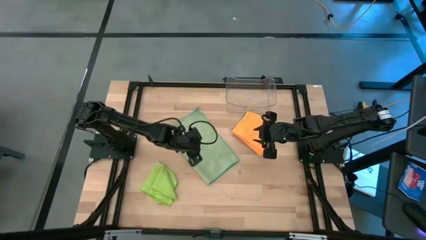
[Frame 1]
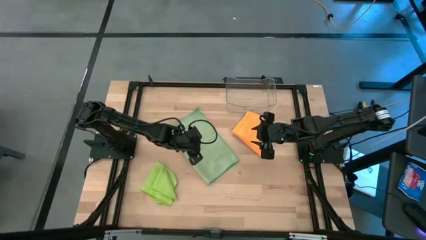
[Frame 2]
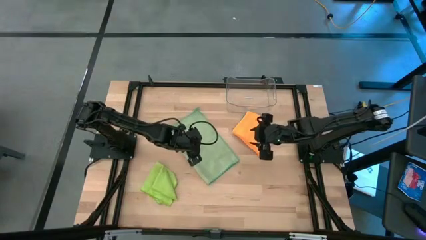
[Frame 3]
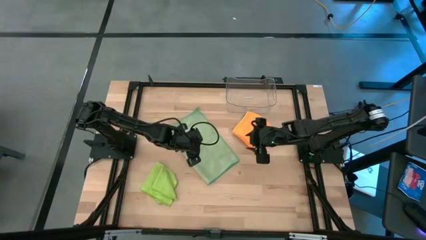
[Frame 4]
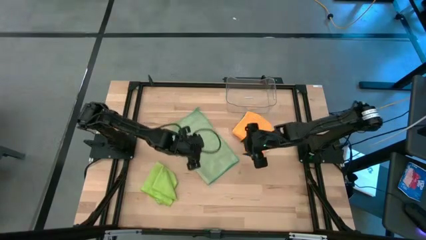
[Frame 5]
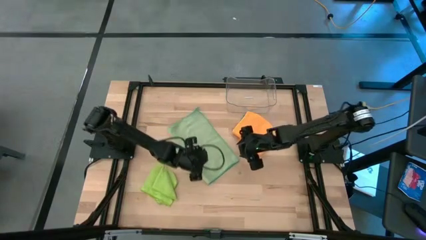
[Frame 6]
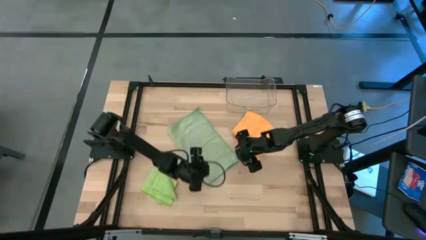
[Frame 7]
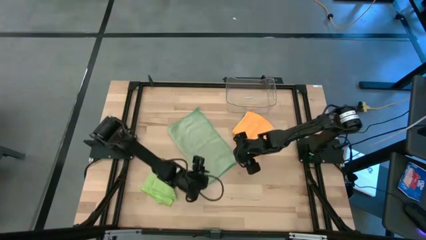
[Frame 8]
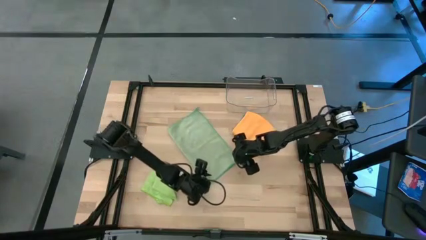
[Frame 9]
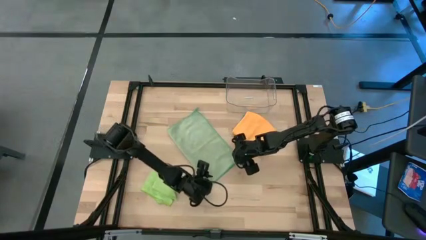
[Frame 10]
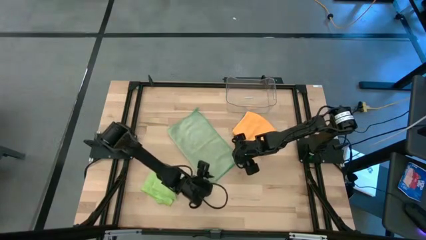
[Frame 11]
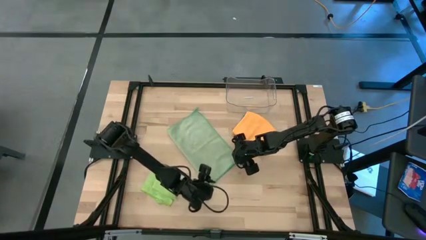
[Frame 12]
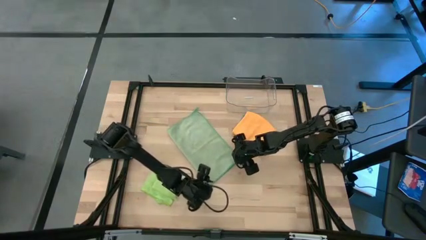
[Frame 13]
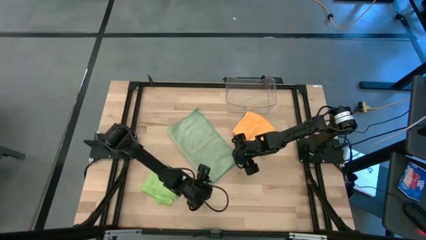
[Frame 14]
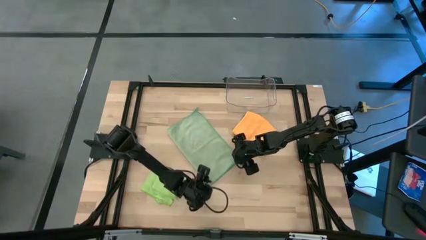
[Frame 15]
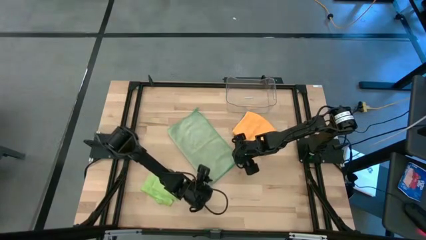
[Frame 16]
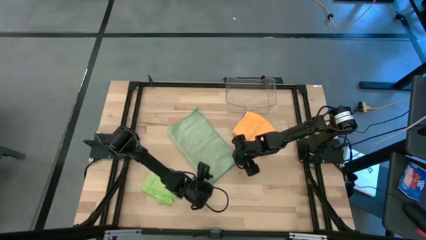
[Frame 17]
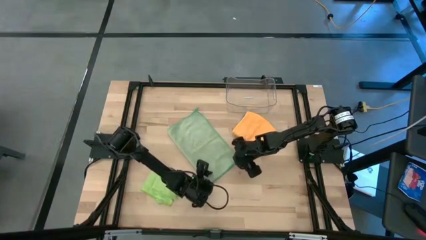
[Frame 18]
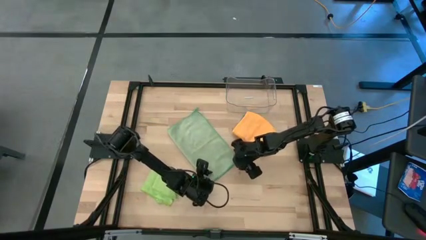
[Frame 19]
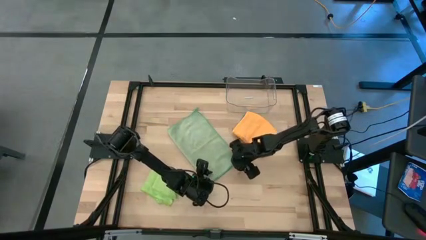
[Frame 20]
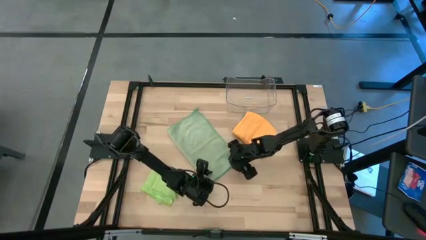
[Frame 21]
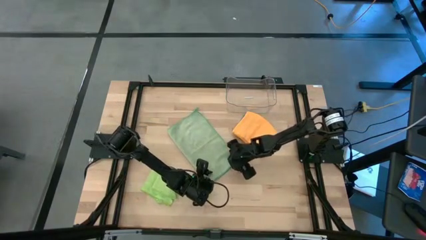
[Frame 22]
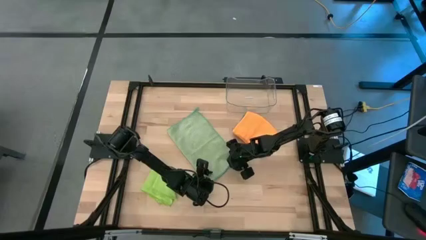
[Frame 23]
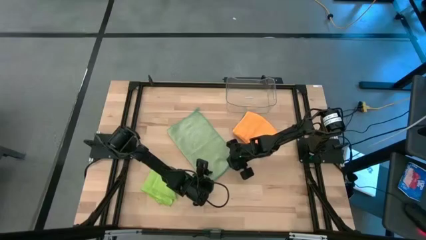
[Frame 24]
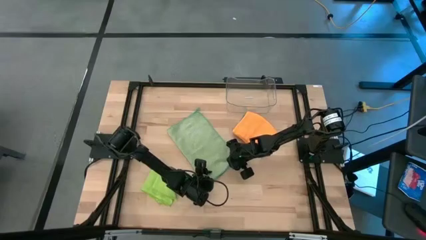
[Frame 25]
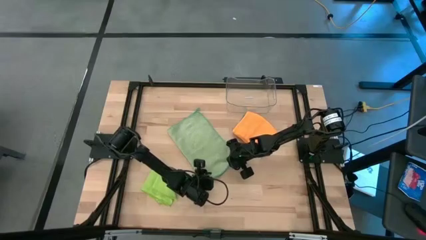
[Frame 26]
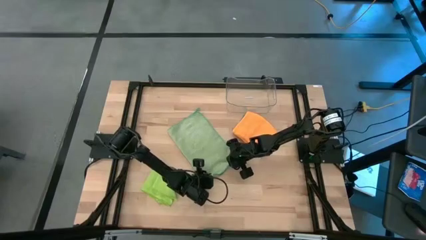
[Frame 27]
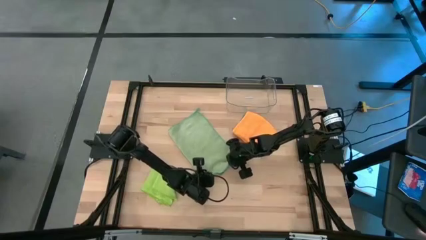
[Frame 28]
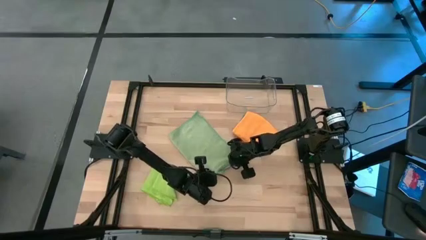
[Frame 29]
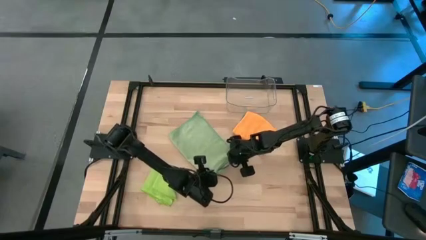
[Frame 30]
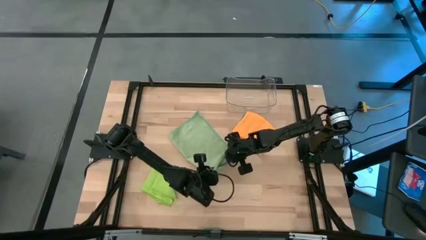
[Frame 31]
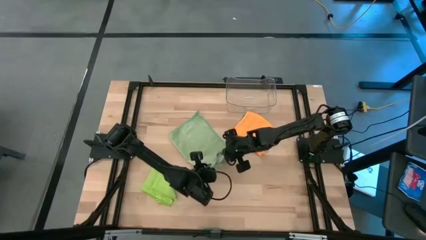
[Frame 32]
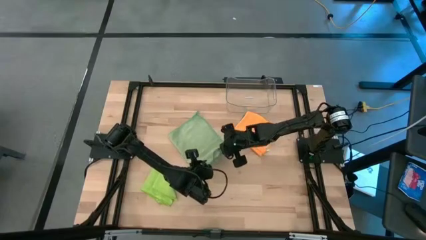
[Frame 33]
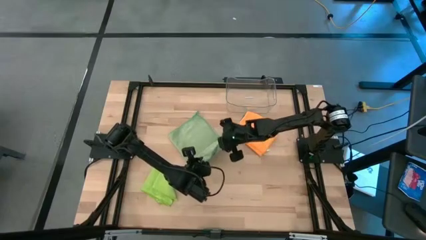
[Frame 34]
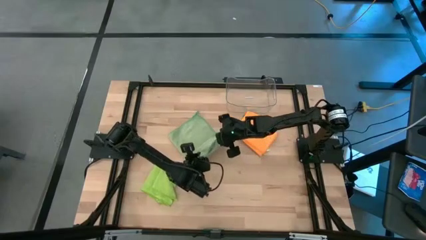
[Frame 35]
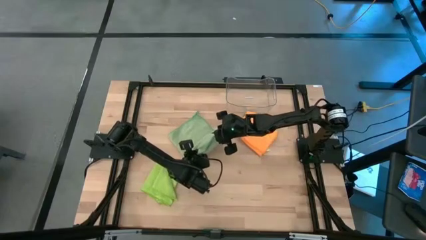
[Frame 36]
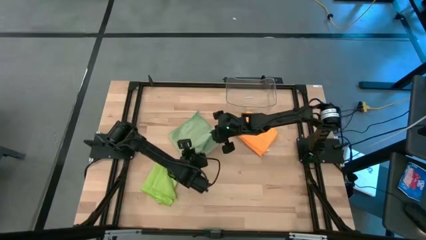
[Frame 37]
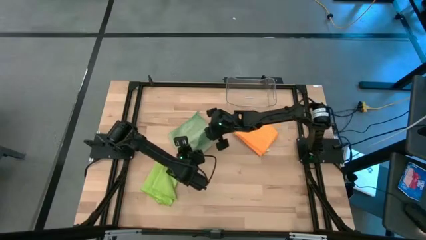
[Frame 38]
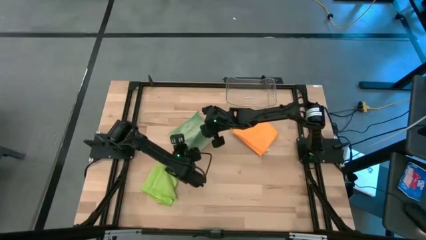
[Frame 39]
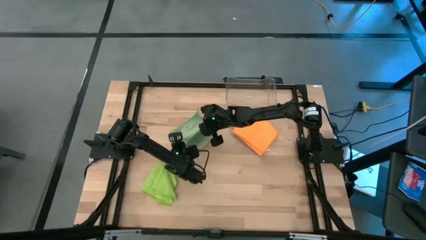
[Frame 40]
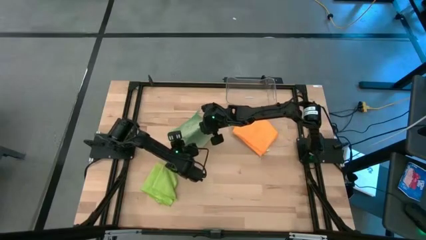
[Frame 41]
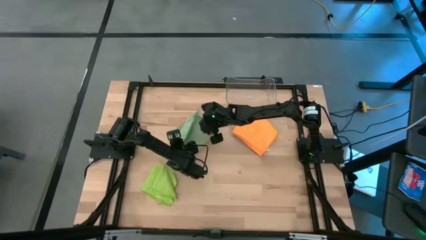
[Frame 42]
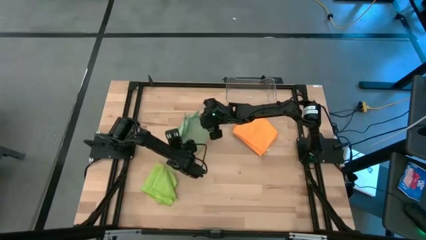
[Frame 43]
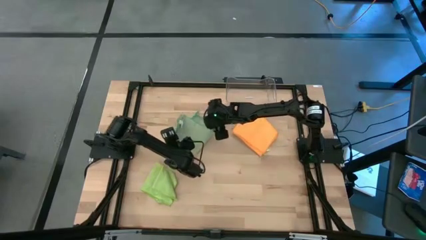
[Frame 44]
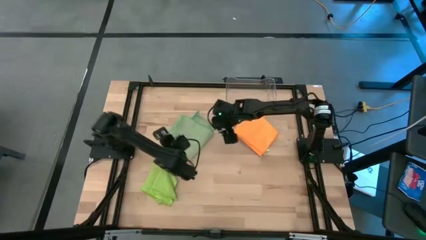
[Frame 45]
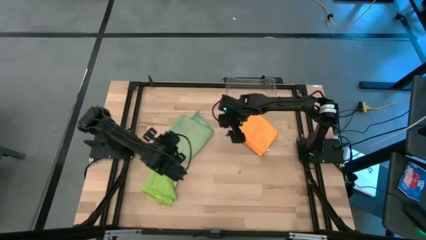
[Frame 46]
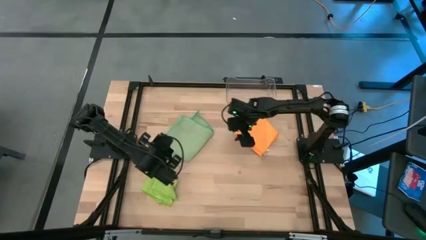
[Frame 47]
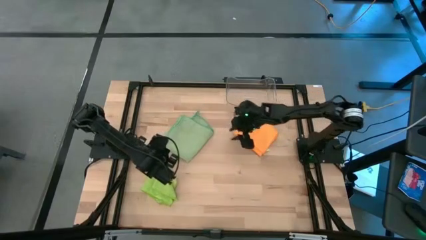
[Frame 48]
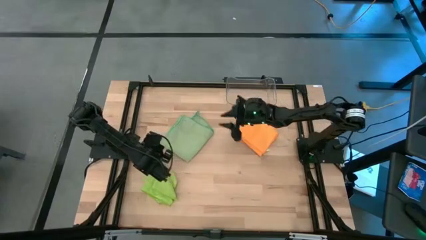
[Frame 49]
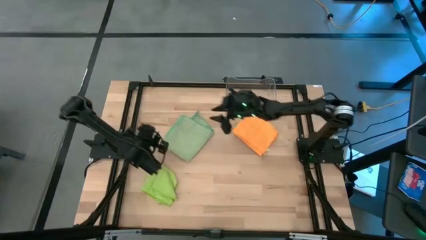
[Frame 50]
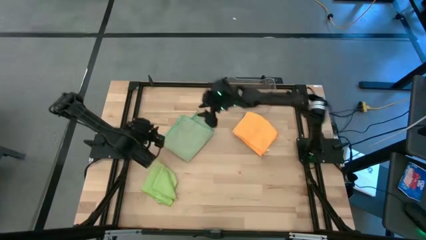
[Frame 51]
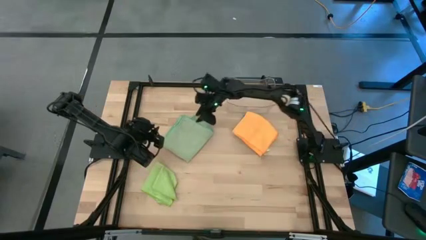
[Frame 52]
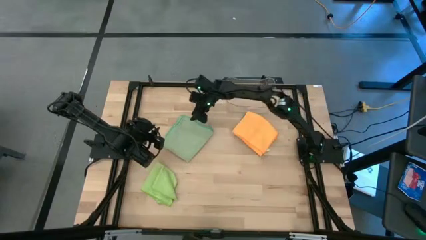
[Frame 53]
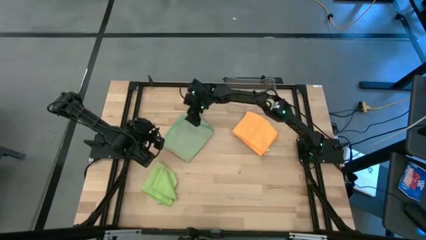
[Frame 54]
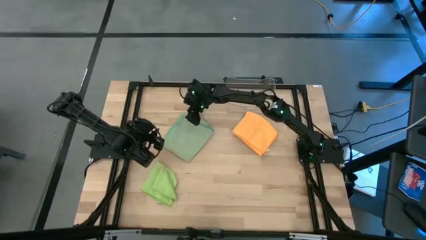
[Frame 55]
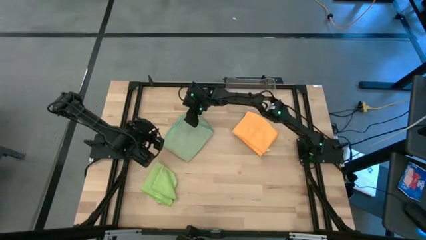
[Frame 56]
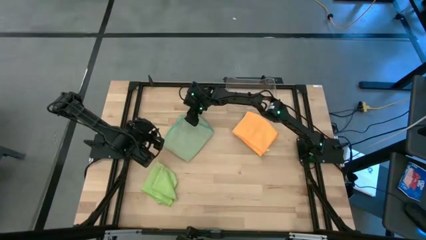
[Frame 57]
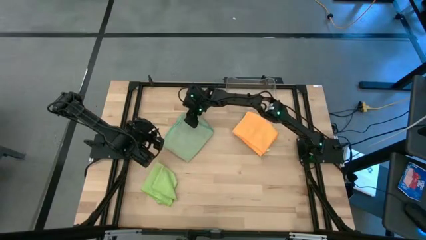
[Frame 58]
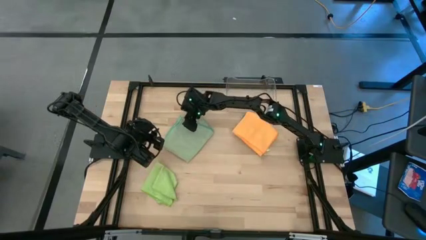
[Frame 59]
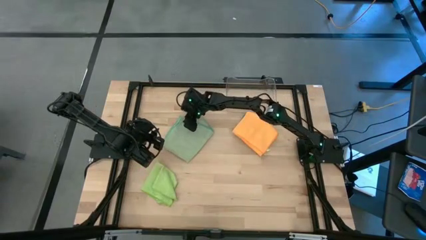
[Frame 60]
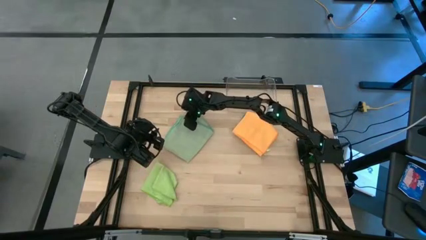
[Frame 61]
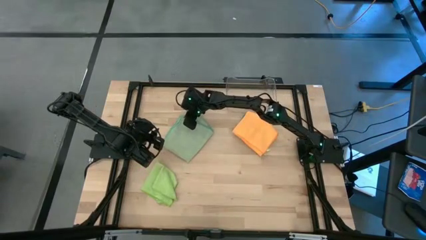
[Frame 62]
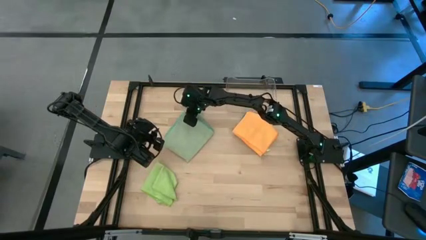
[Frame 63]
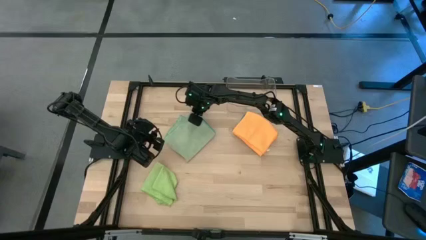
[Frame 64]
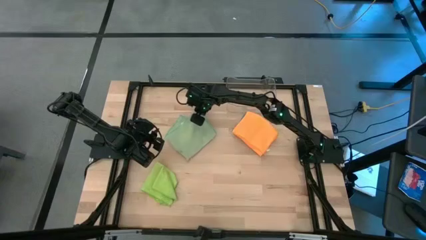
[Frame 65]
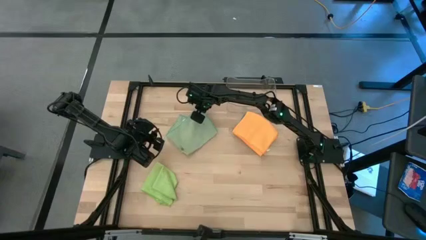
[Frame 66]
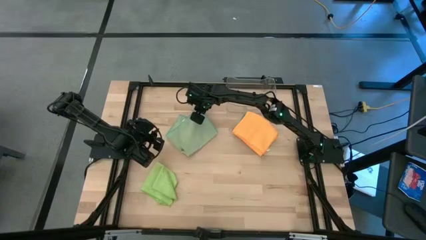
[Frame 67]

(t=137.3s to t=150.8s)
Task: Fold microfiber towels
Fold the light green microfiber cloth
